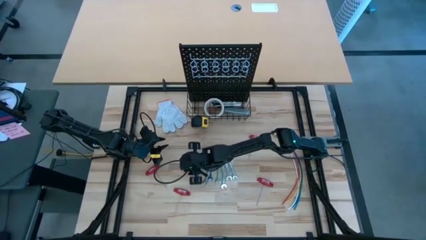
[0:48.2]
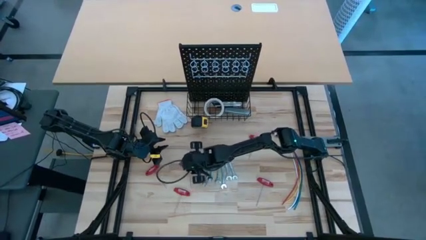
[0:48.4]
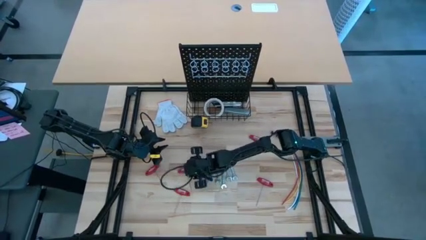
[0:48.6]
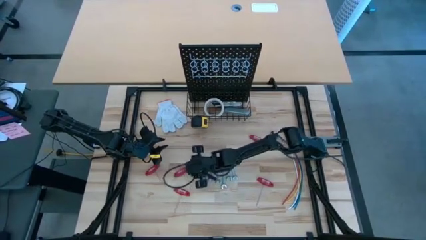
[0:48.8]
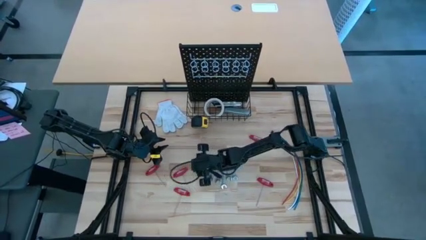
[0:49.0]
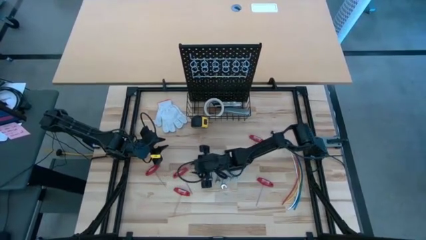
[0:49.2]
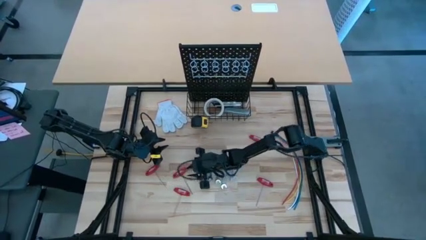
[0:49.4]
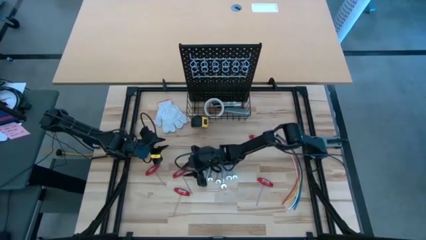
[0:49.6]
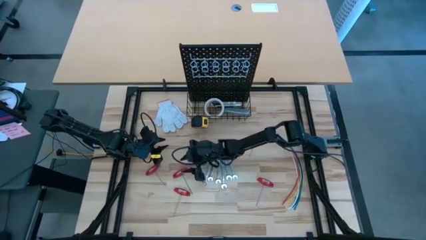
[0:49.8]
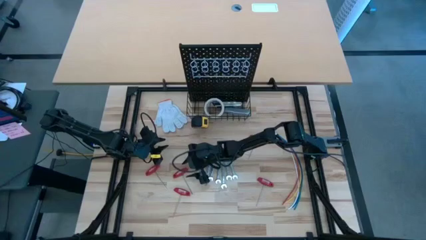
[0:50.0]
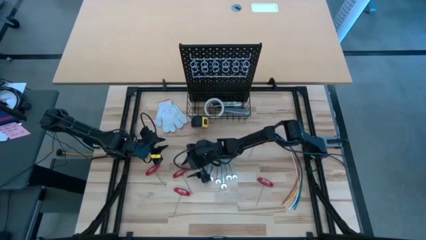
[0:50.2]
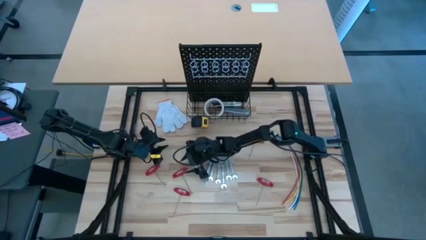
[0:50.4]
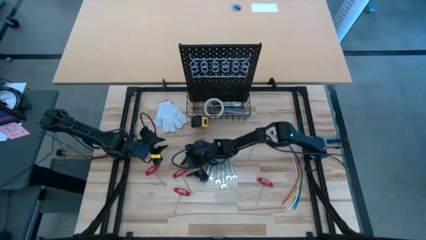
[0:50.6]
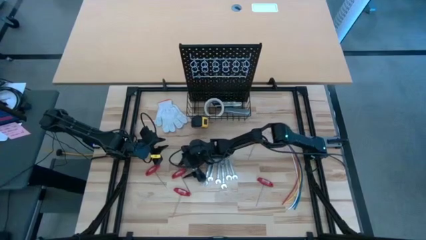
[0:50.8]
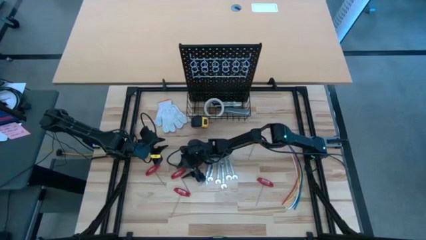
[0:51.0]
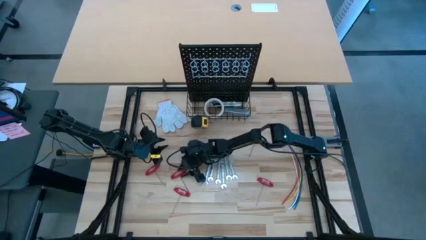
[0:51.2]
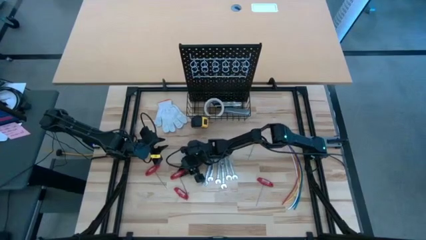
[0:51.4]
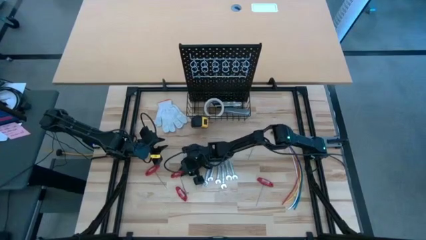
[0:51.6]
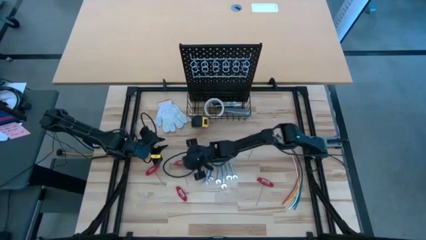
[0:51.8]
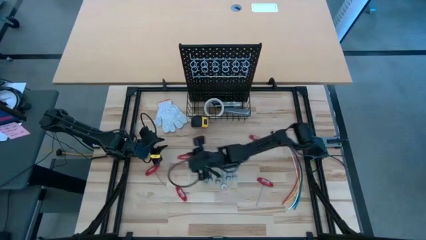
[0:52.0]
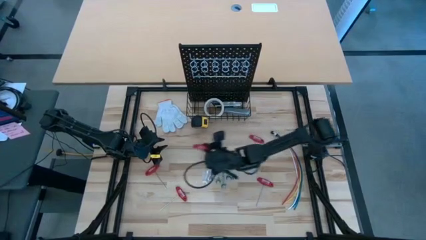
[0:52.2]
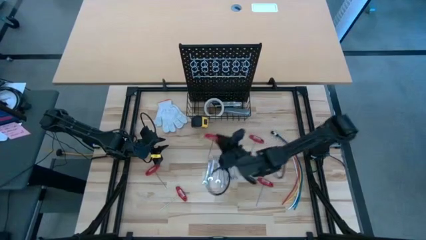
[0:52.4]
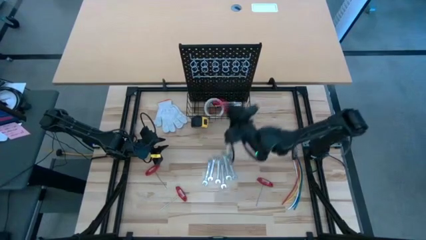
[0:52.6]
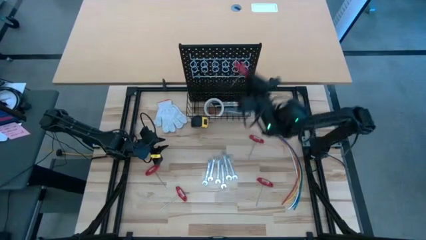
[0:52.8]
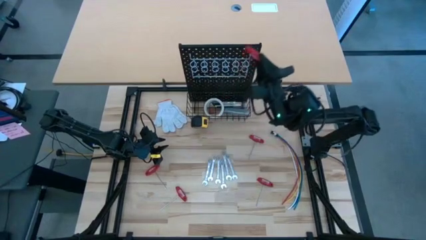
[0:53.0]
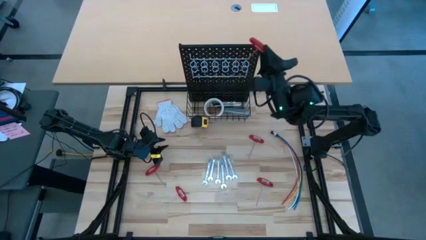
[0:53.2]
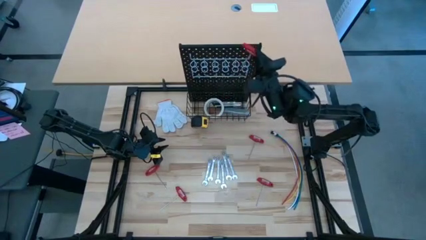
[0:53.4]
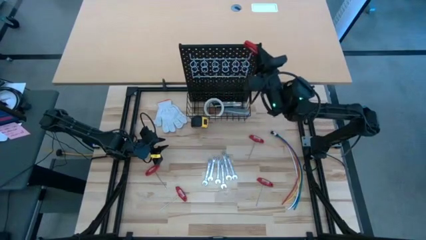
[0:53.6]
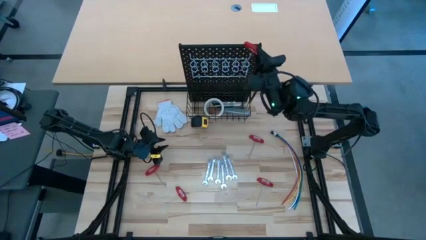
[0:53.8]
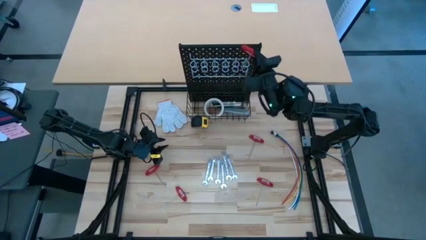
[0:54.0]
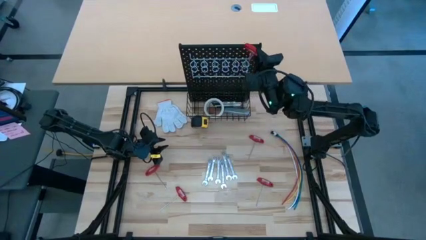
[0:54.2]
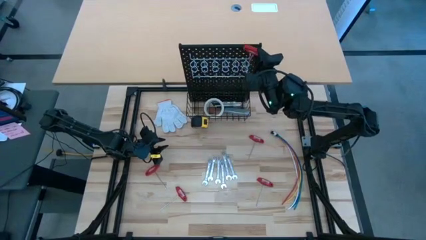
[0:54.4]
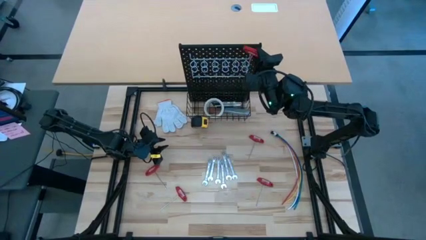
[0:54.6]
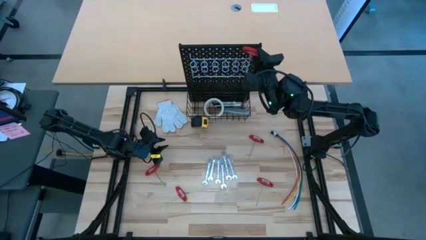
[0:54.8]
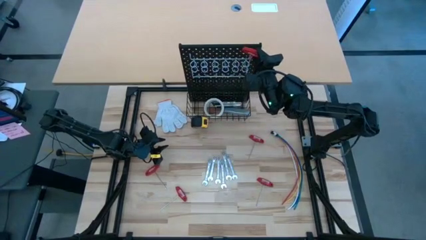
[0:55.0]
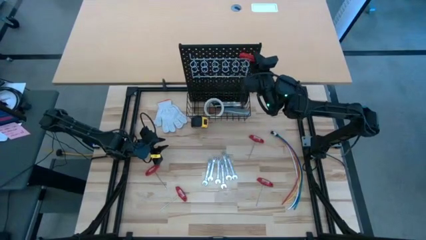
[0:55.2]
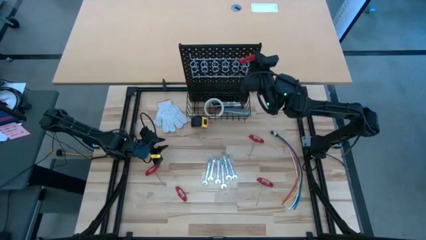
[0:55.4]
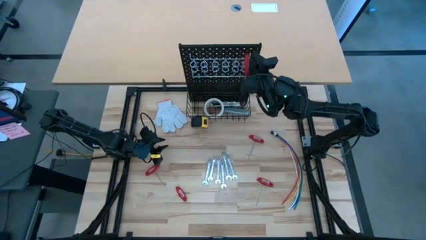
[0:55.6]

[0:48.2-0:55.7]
Task: Hang tools onto peg board
Hang the red Allen wrench on the pegboard

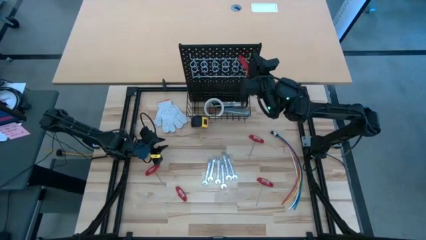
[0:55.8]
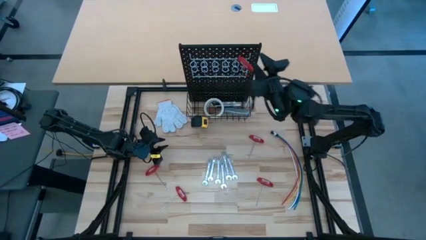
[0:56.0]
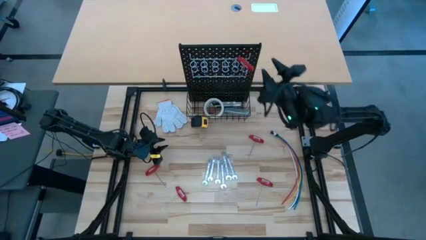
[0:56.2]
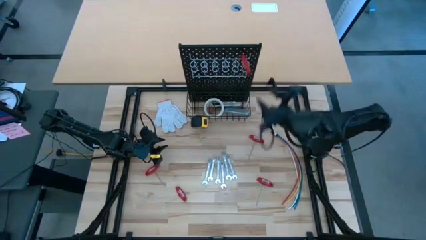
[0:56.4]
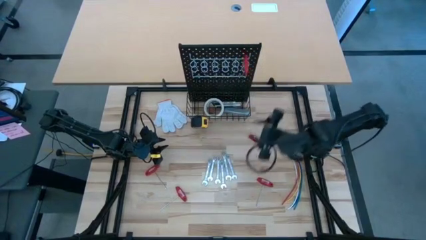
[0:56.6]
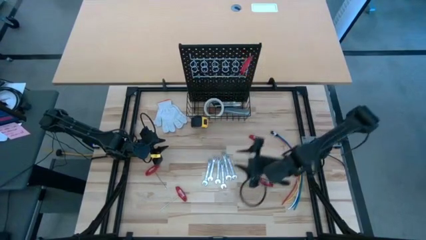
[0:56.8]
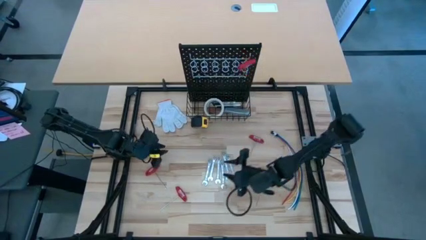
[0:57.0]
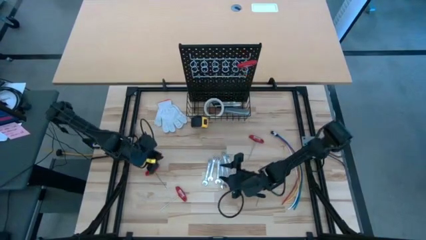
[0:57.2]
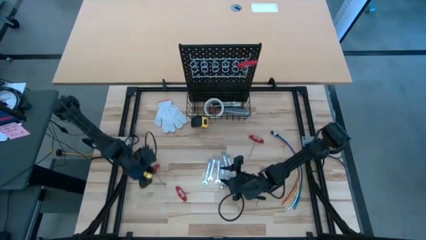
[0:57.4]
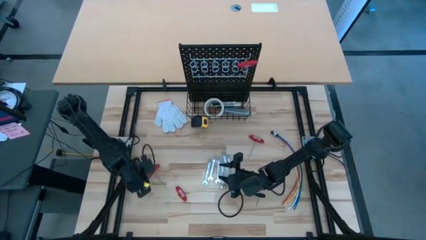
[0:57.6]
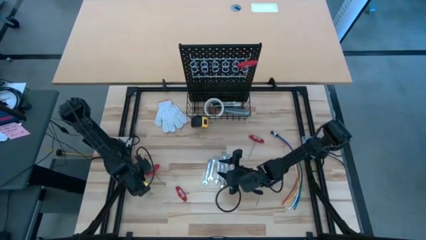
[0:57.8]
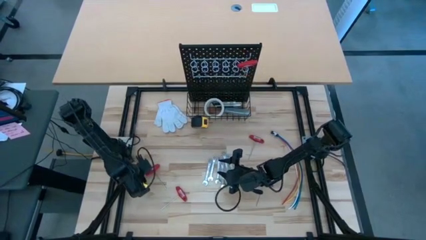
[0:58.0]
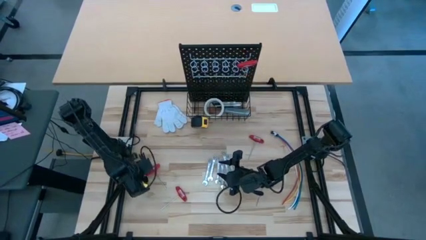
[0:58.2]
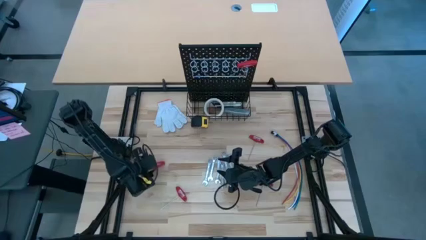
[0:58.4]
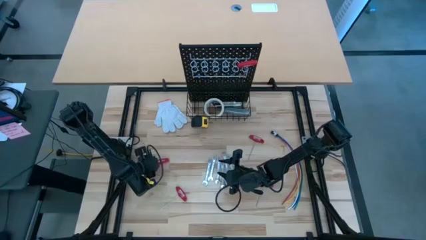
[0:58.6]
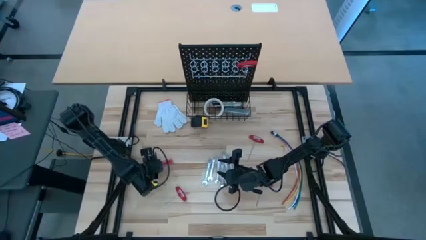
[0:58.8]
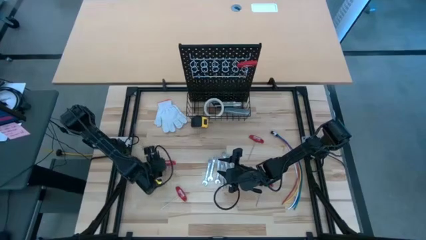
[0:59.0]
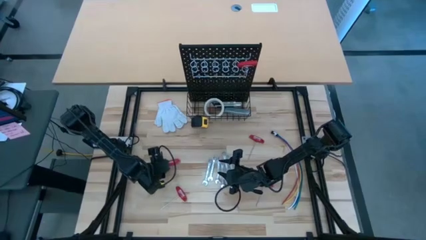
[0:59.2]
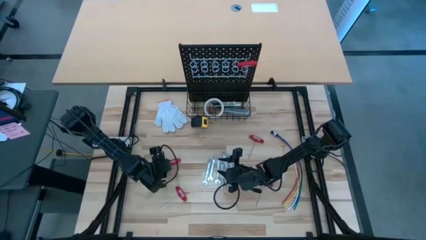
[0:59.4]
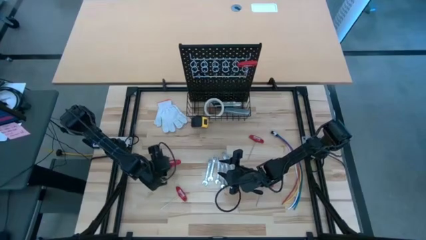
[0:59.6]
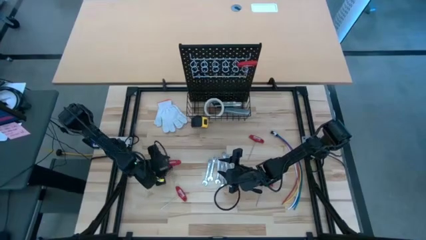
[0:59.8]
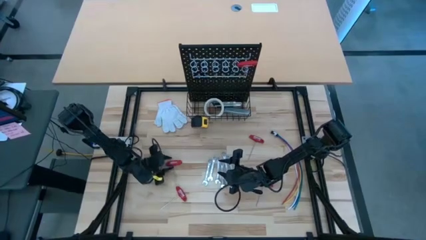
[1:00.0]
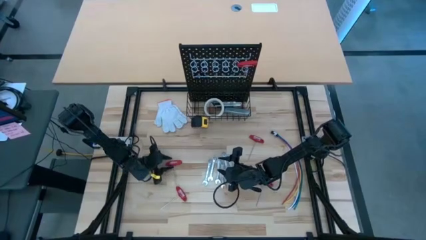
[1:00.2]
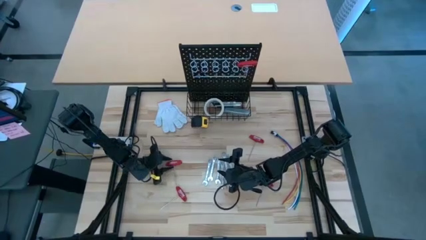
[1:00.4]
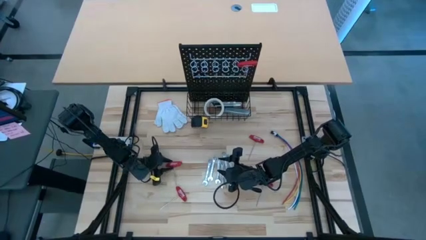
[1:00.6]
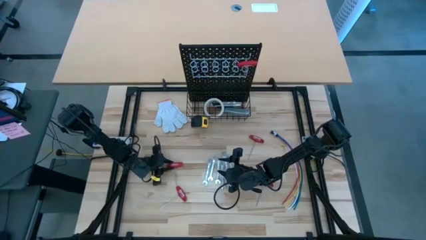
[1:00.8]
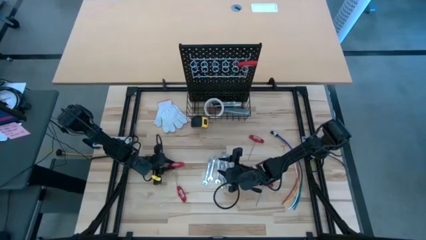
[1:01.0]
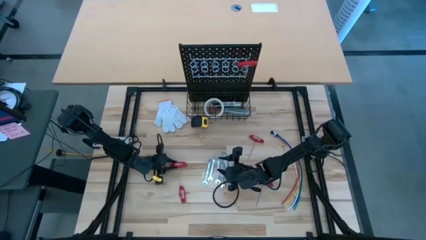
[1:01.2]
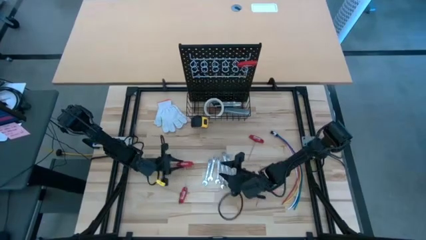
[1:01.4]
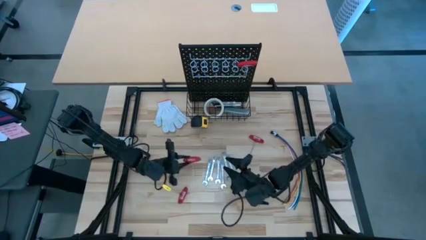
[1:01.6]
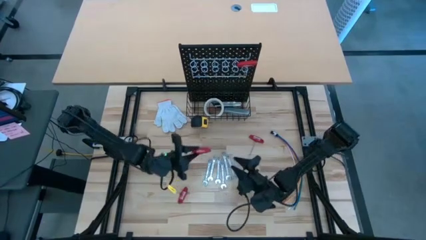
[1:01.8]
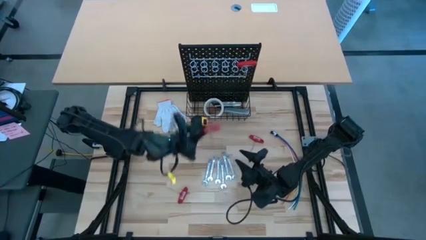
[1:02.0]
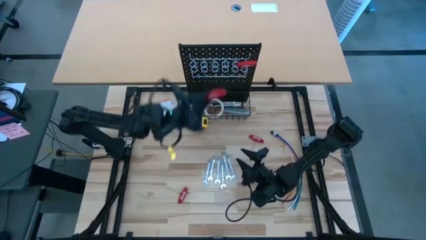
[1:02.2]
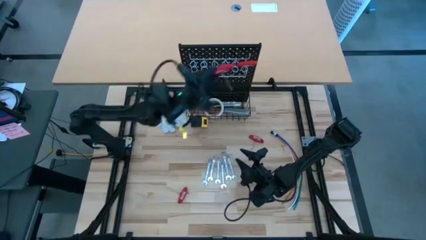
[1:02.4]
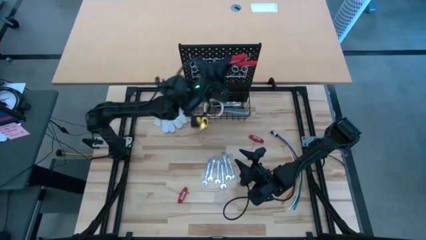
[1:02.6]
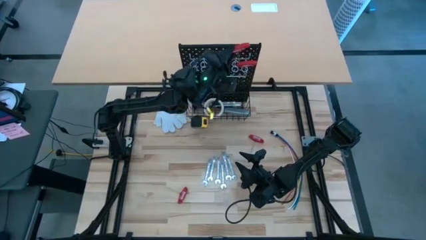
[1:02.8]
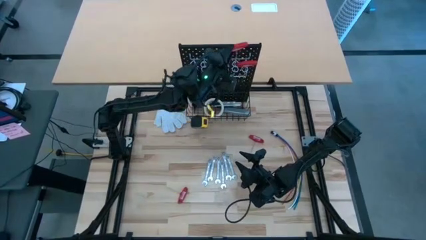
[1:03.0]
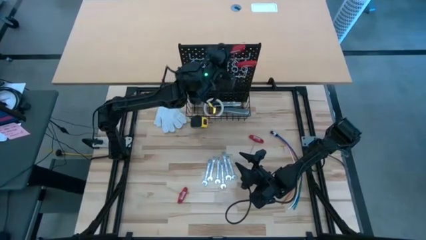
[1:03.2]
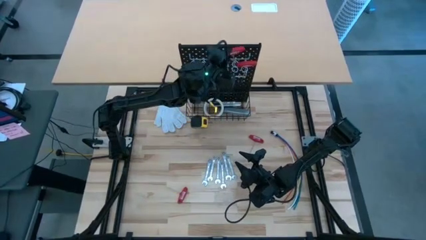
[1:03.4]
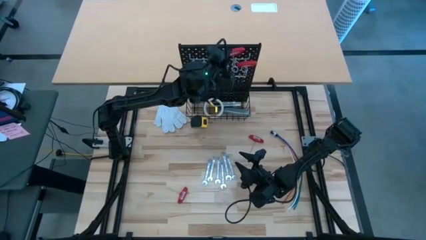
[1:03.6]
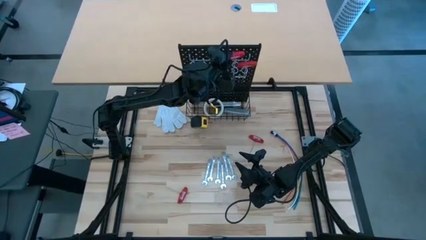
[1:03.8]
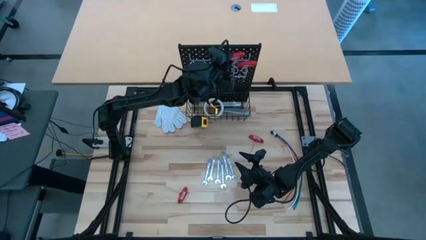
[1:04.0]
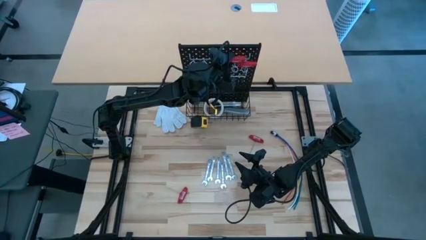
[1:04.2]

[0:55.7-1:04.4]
Hang the red Allen wrench on the pegboard
